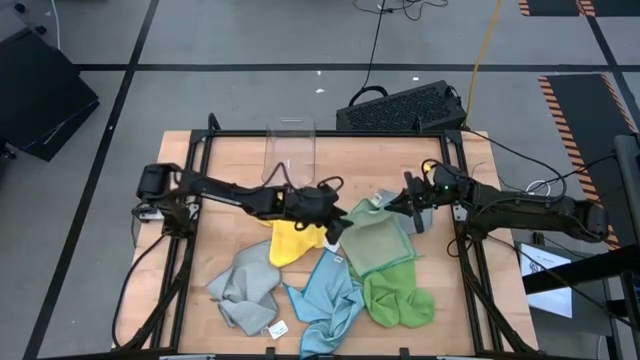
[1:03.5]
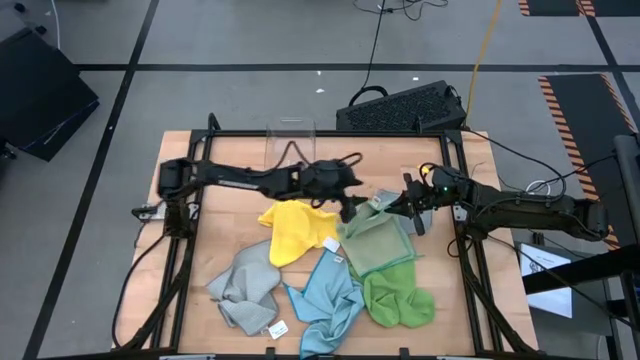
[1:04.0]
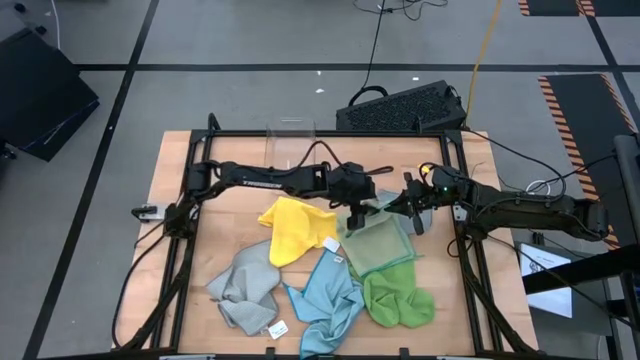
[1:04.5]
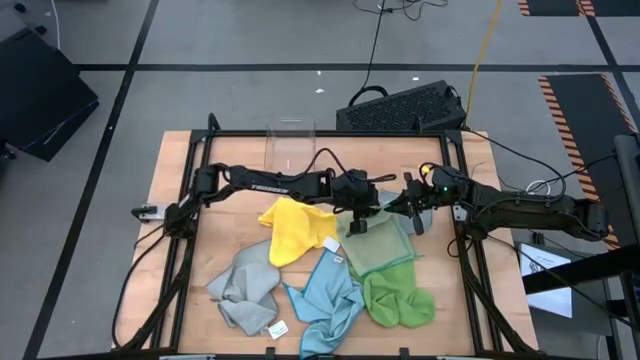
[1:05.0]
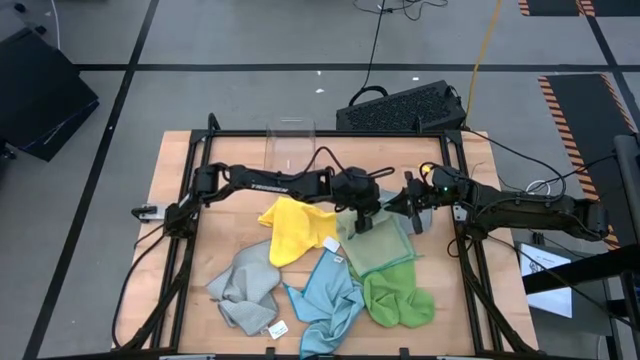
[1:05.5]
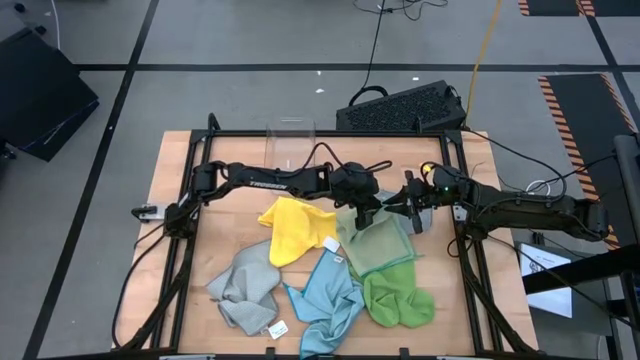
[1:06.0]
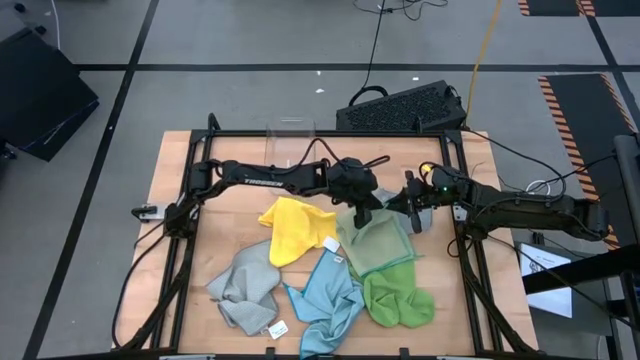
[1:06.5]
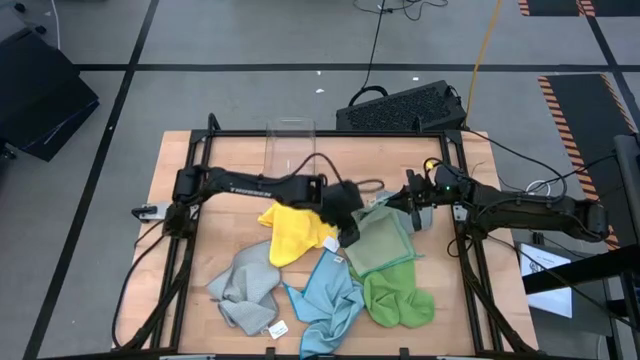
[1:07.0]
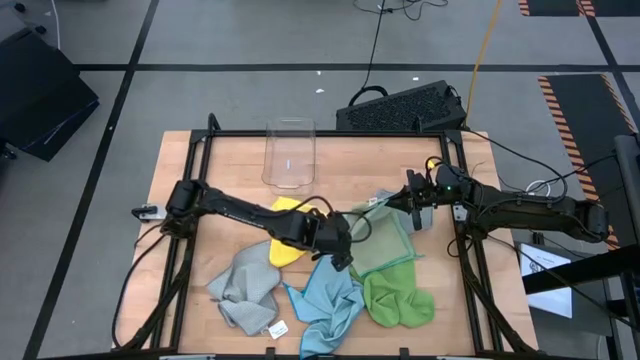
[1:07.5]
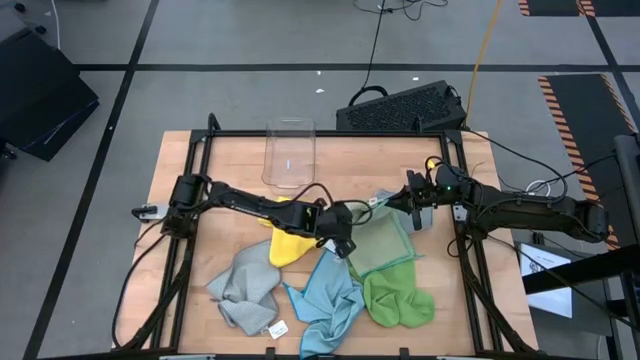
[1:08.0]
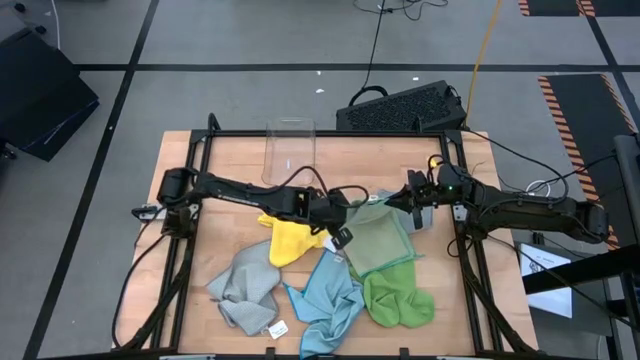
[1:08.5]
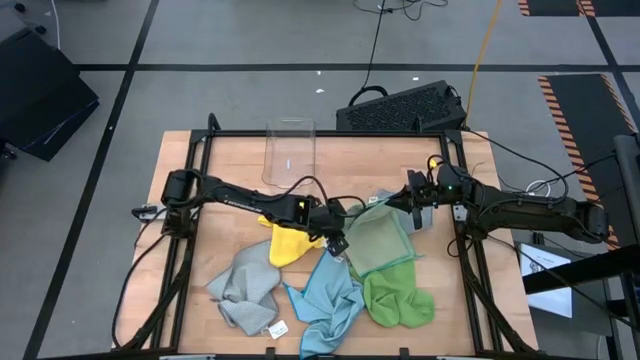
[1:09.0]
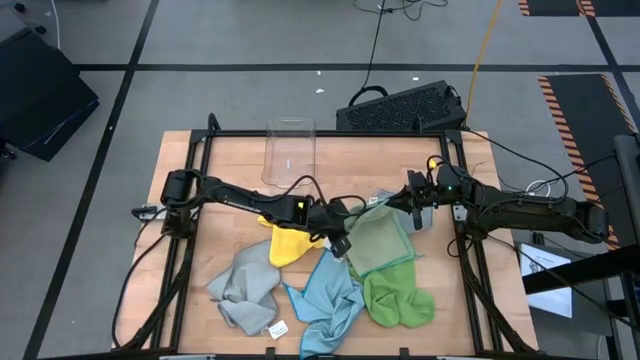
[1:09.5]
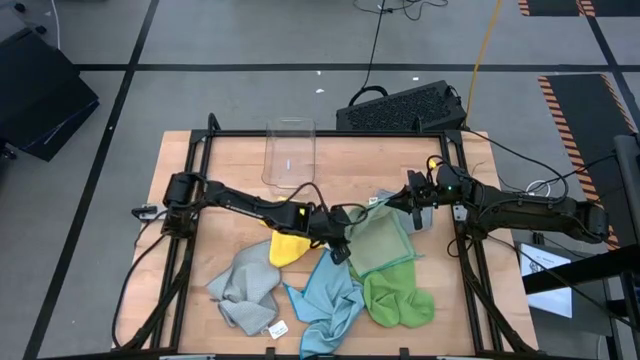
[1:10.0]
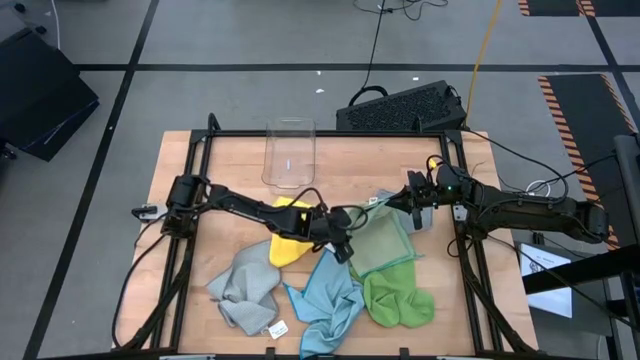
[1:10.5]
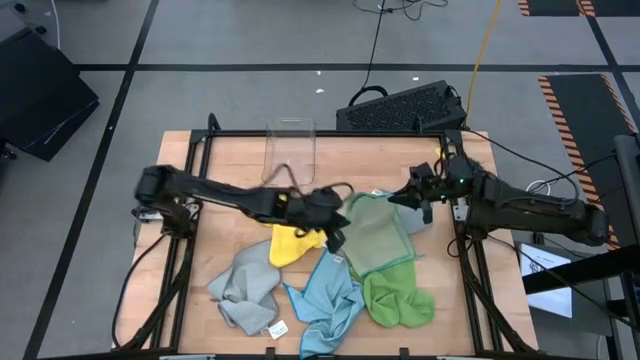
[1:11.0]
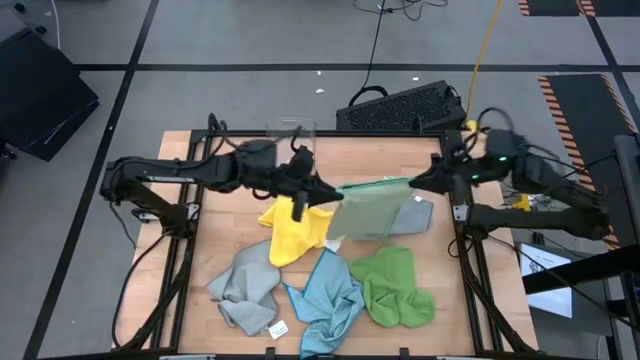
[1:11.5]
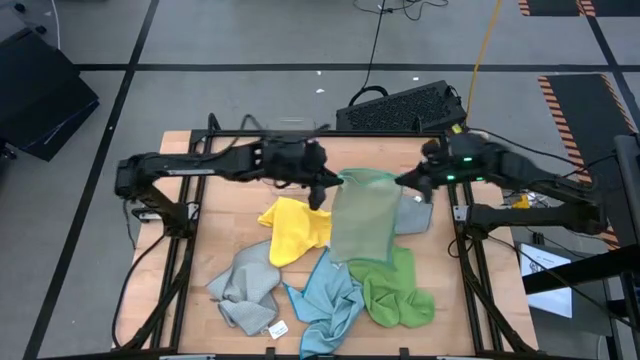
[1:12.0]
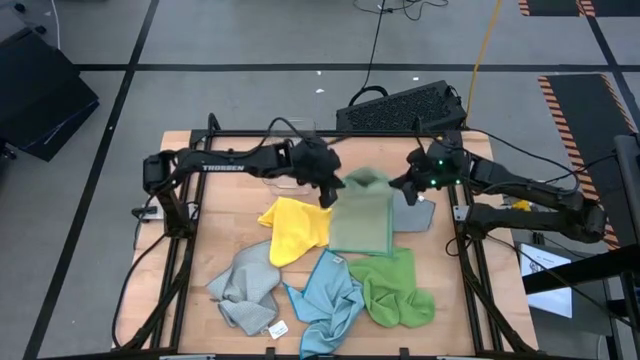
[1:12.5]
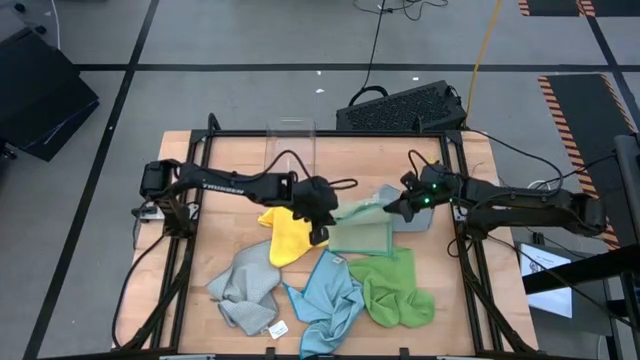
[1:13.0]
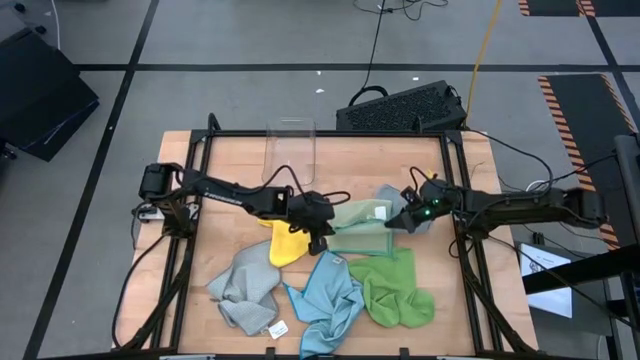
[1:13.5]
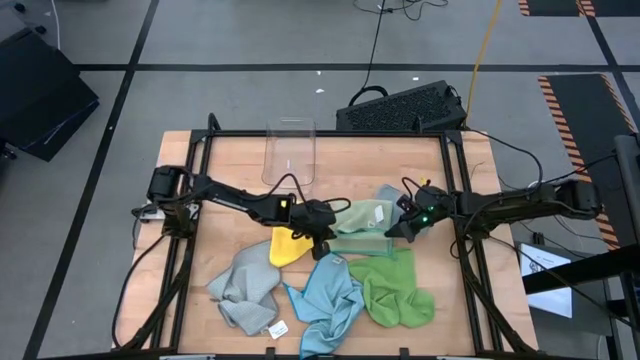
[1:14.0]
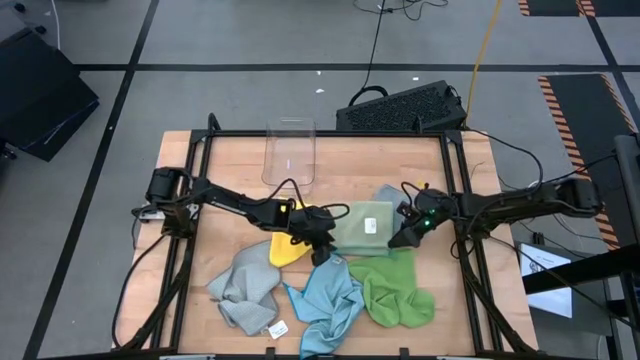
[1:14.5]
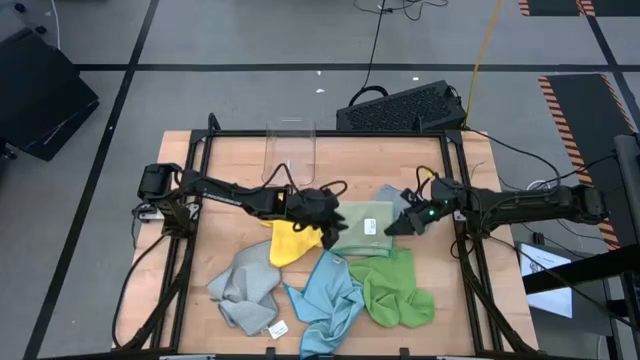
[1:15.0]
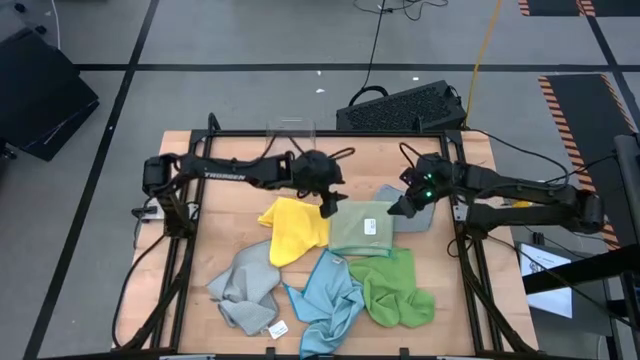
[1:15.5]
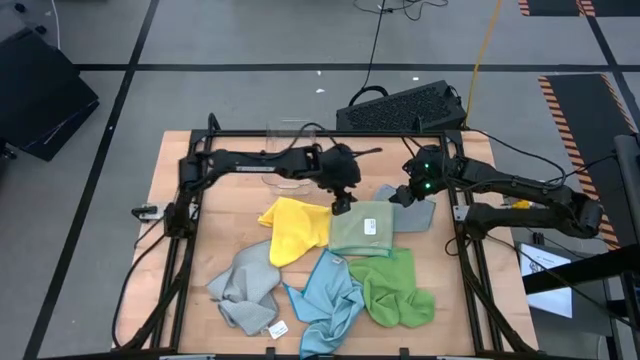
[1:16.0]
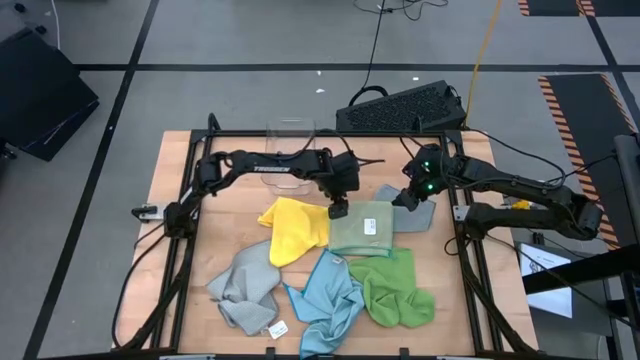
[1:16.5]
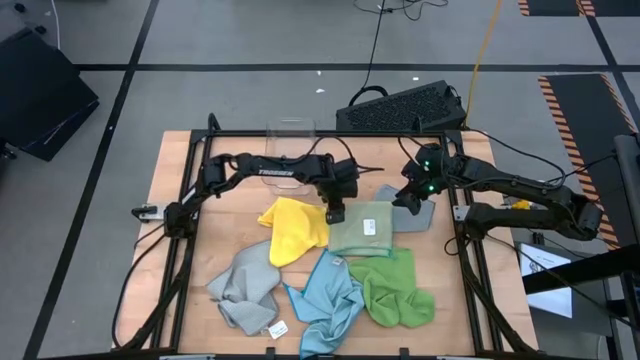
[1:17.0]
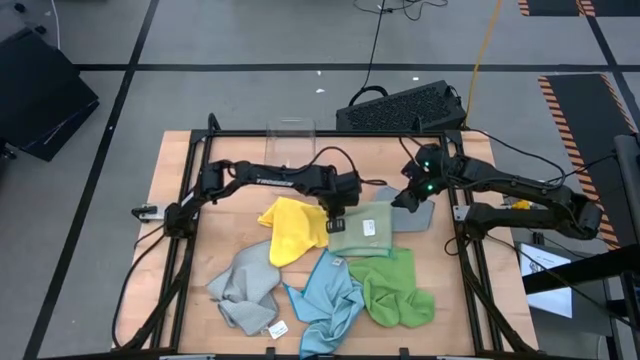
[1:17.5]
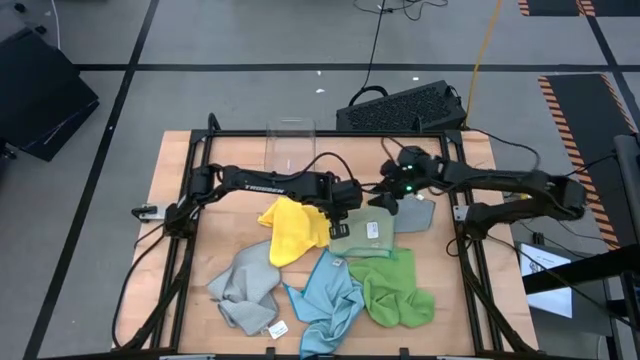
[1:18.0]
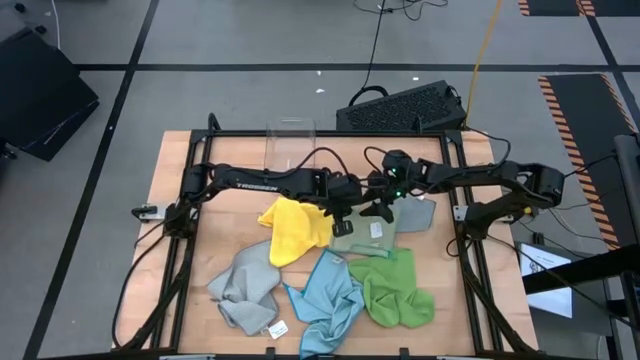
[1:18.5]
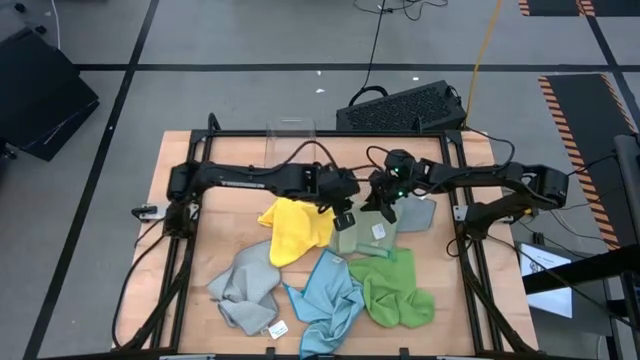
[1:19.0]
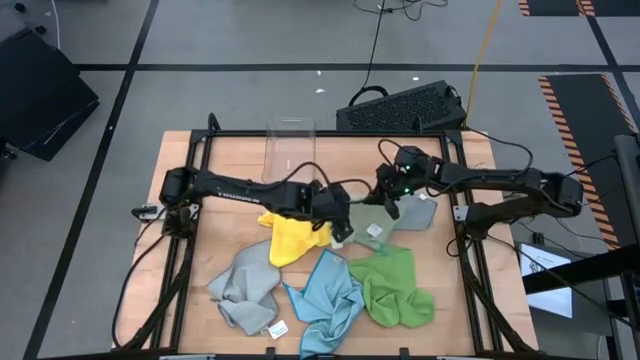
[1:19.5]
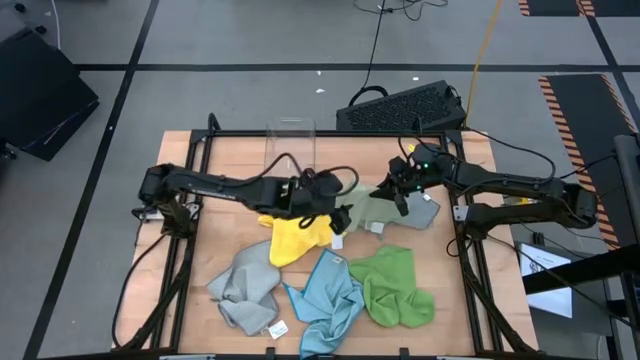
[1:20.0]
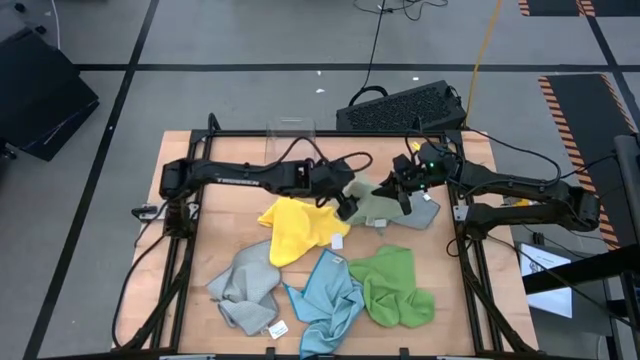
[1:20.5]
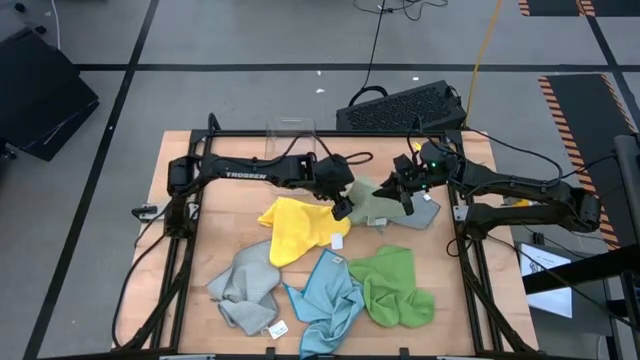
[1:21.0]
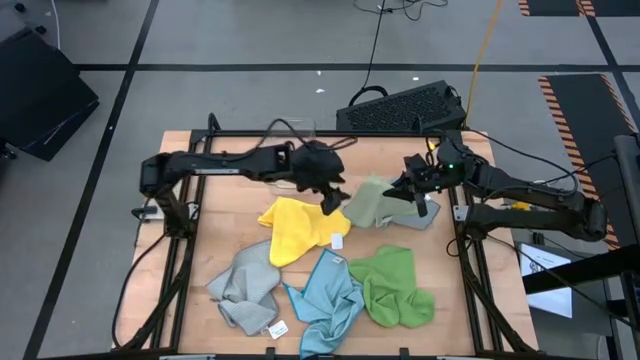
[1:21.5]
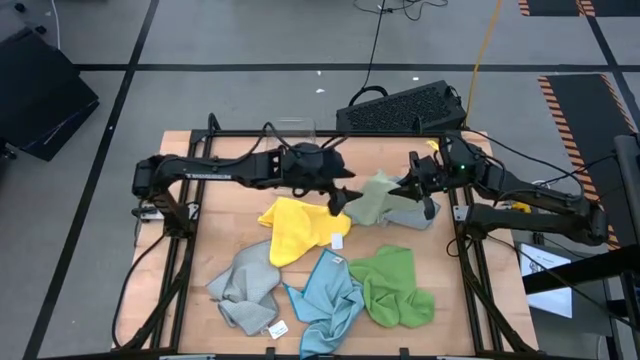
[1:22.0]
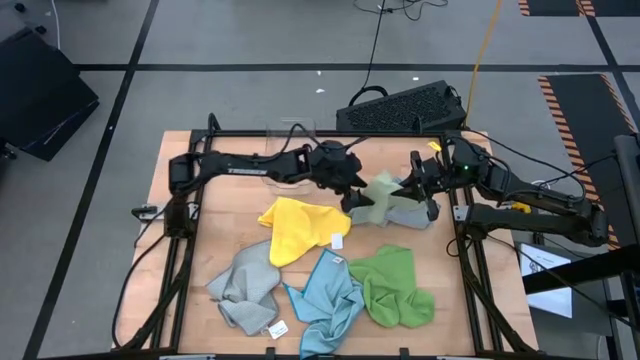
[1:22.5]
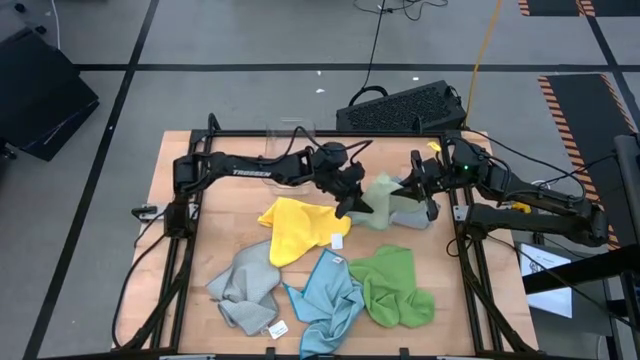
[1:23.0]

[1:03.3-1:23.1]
Task: Fold microfiber towels
Fold the light green microfiber cloth
